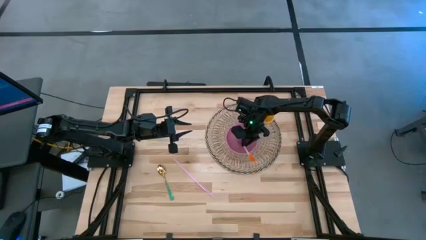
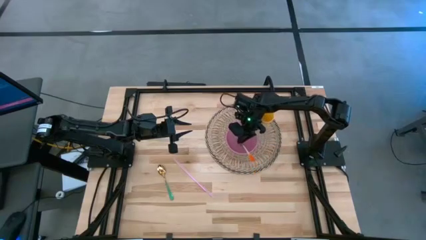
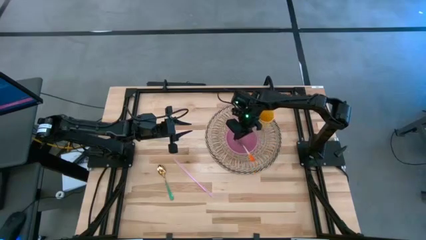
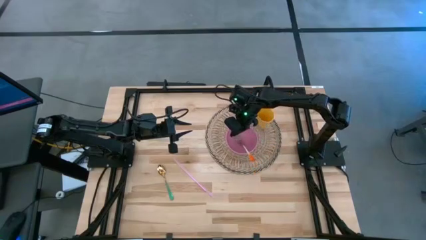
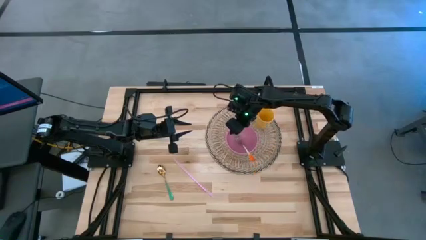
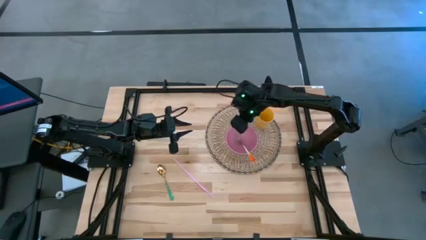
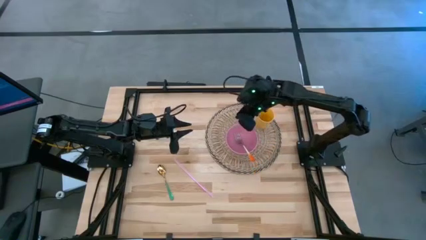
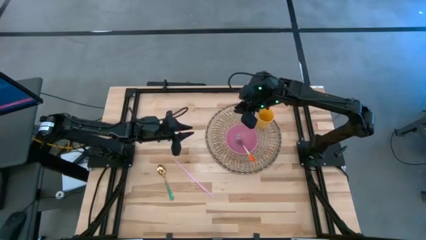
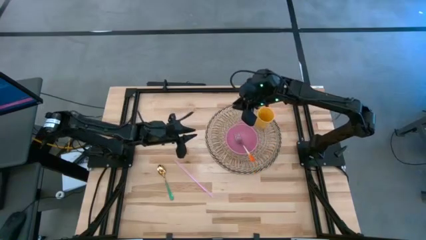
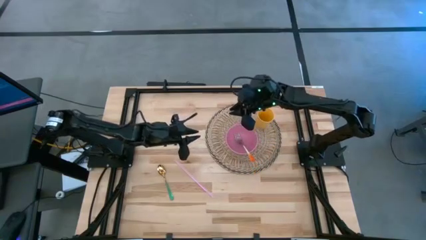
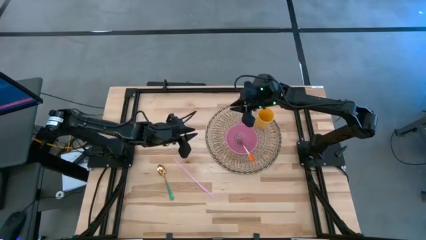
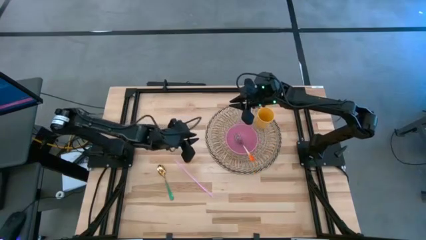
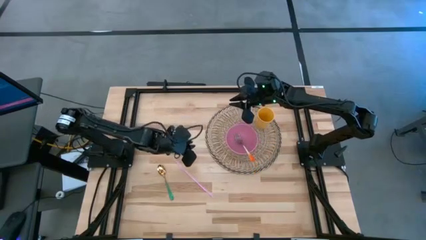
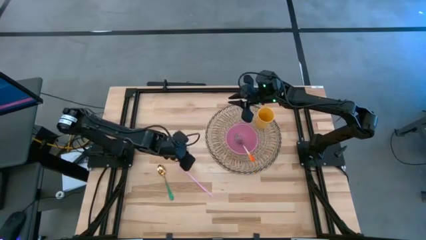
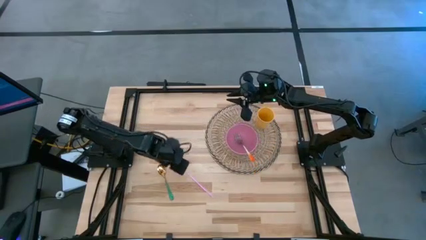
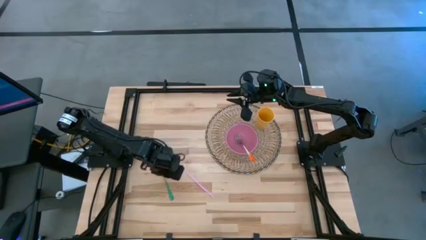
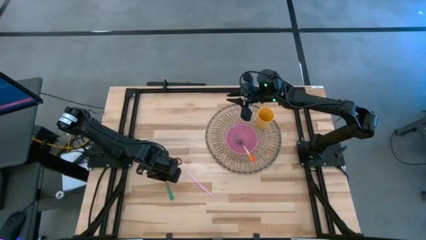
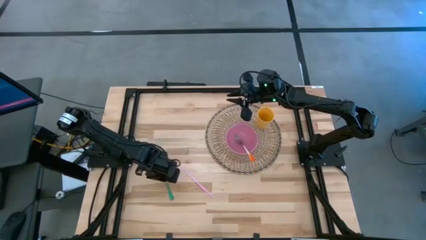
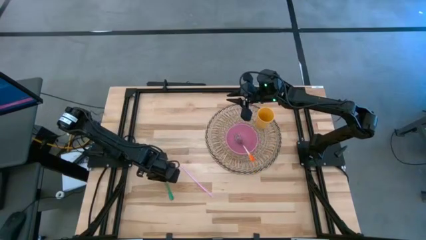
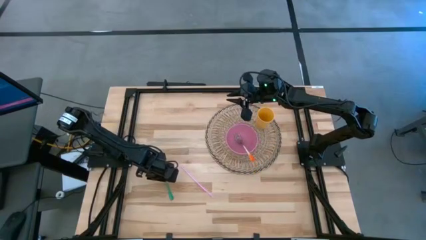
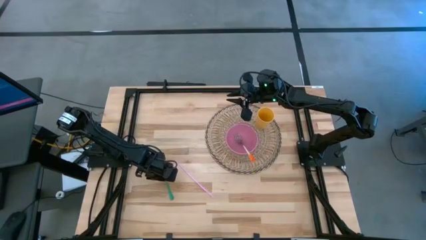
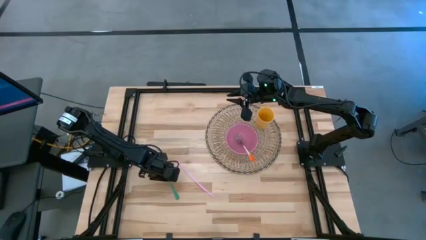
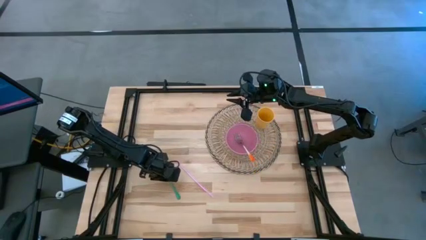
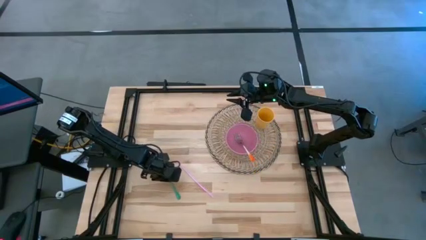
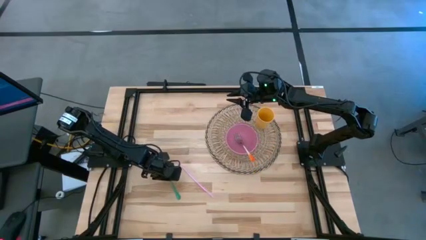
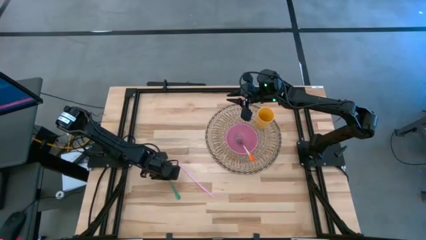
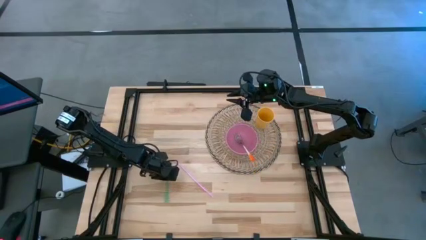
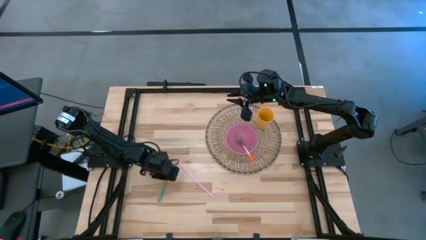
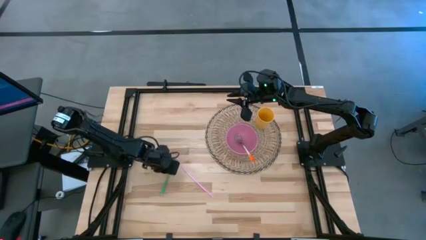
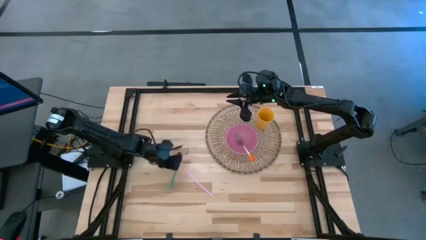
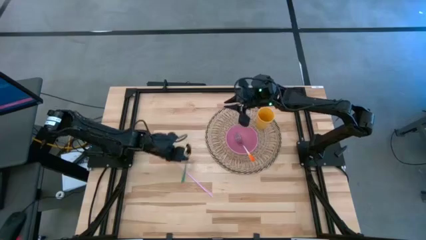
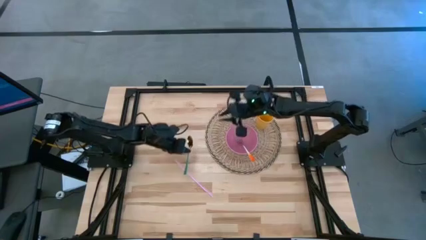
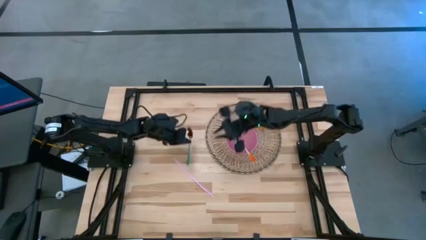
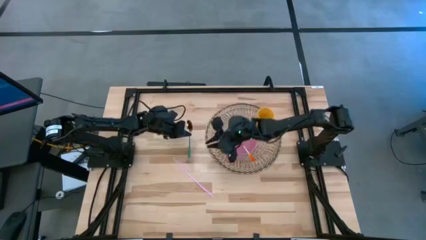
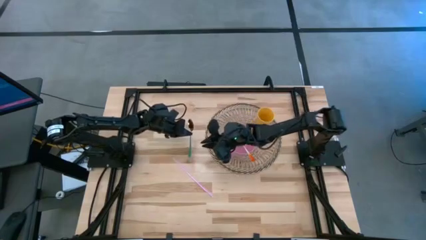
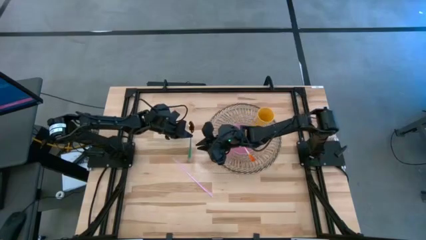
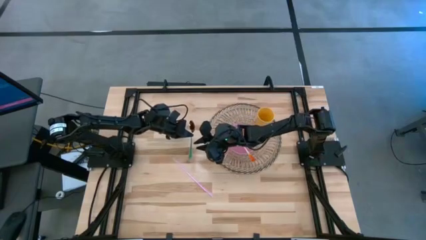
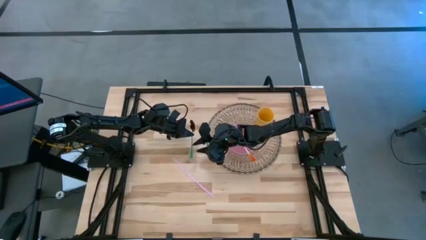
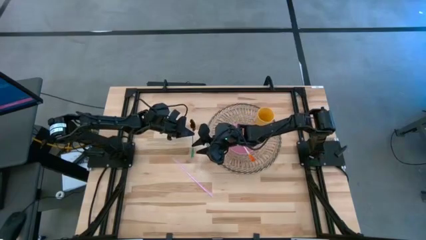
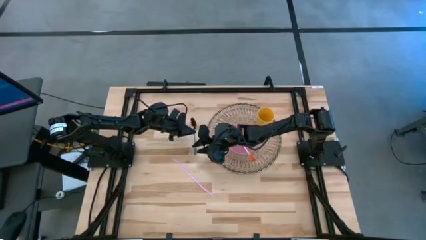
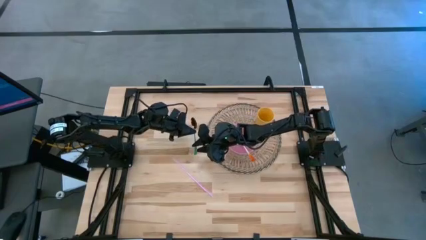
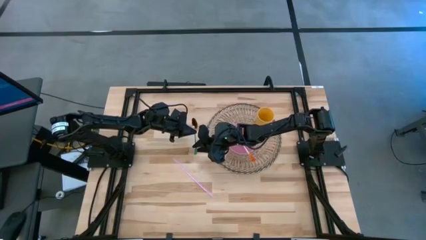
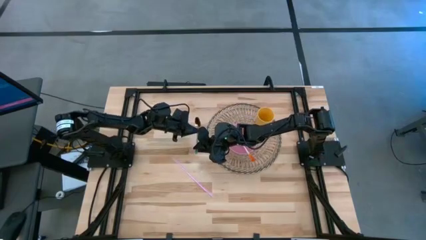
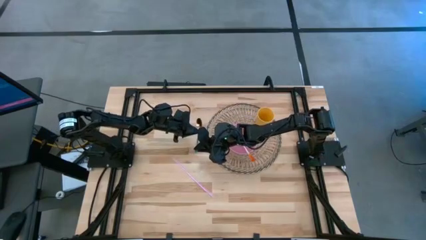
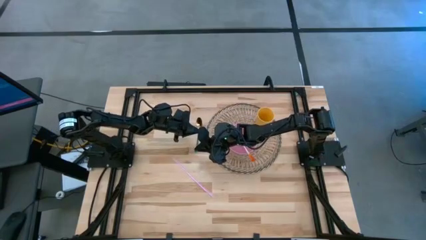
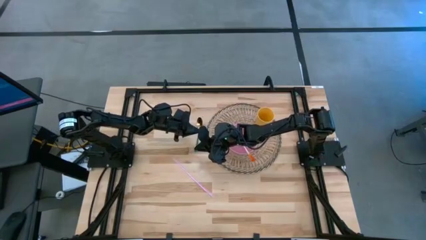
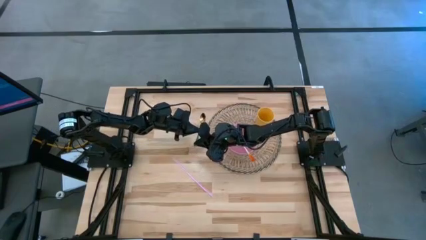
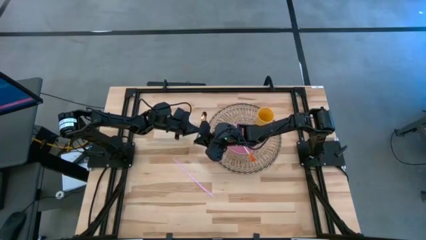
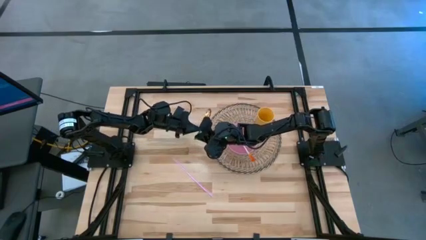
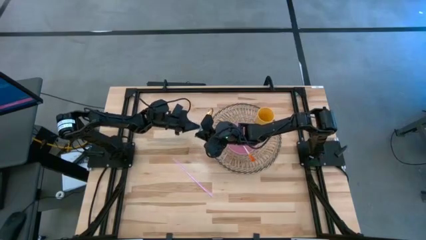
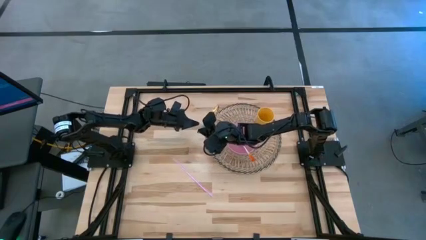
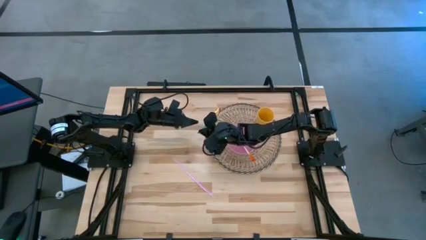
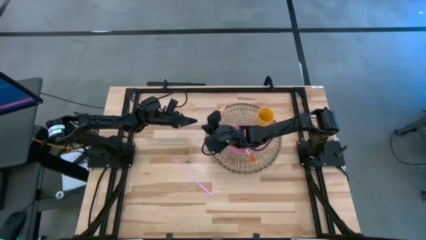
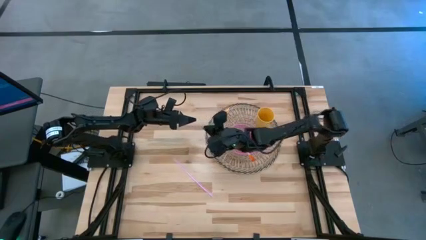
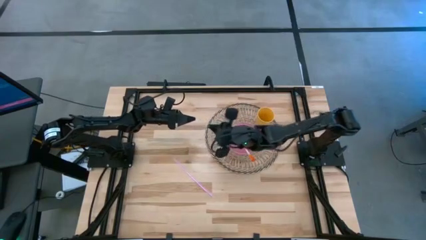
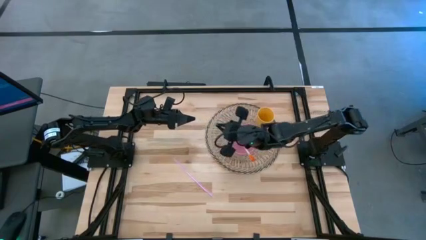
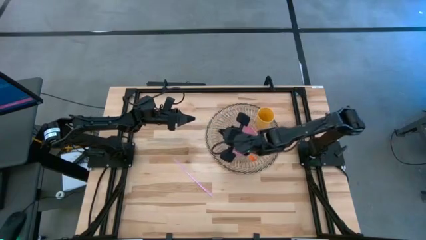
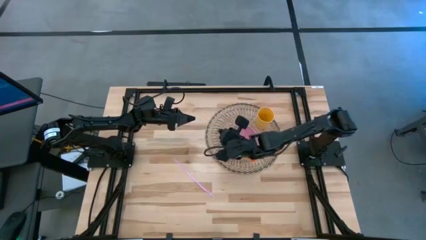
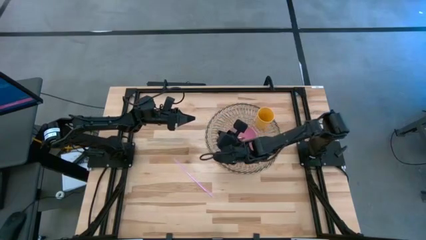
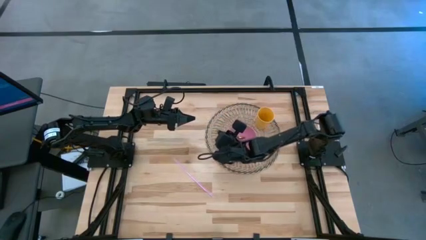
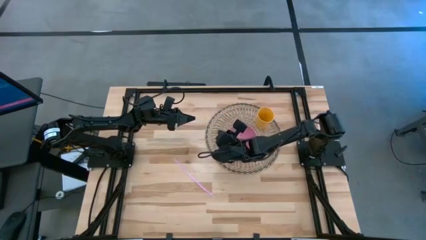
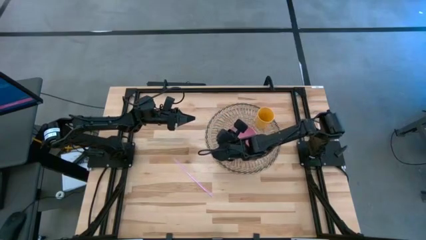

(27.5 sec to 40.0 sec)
Task: Pick & Place Utensil
Put the green spoon into the pink bowl
